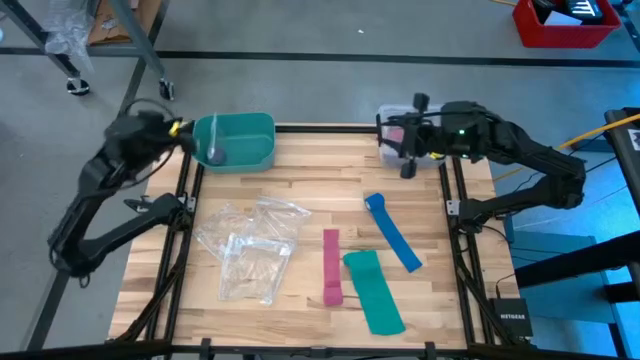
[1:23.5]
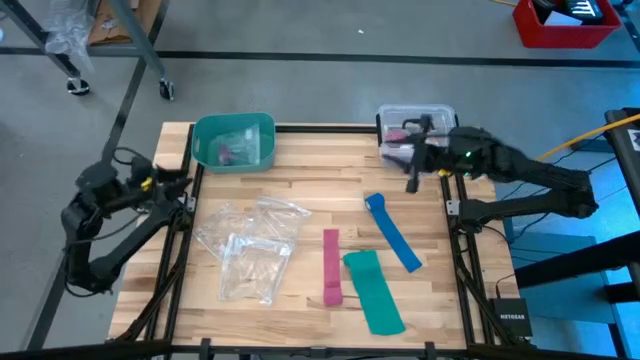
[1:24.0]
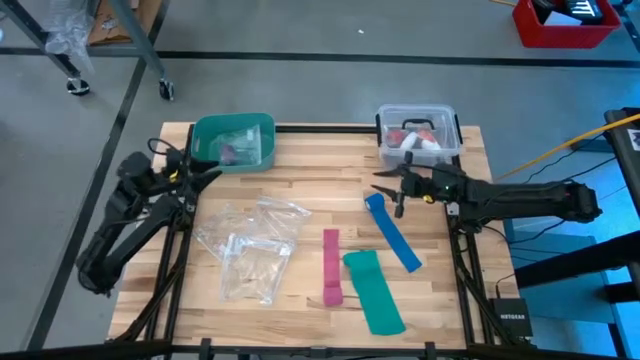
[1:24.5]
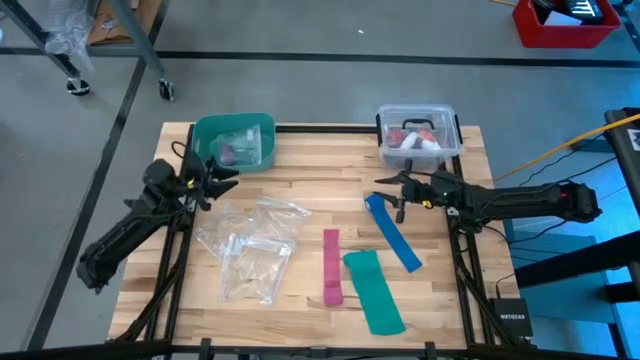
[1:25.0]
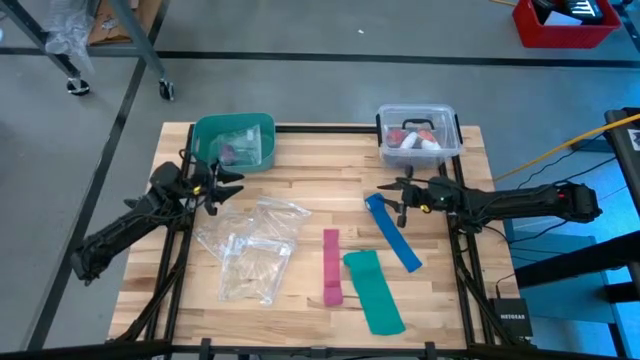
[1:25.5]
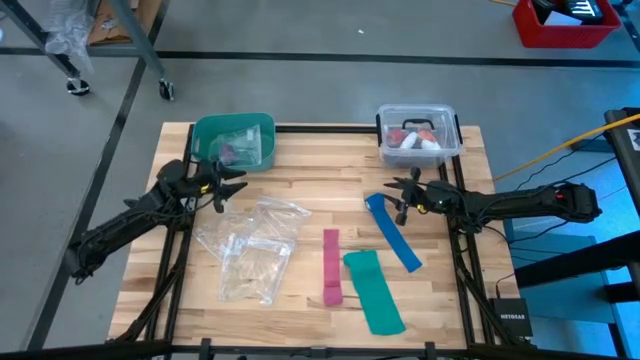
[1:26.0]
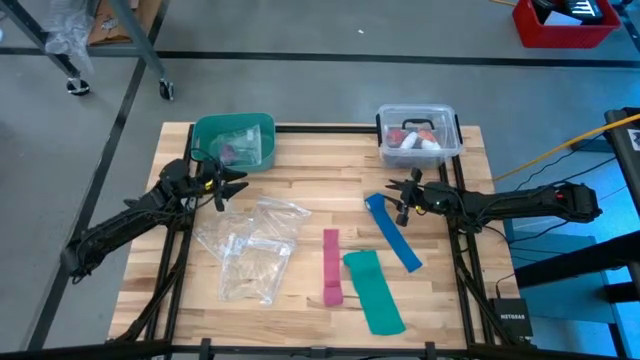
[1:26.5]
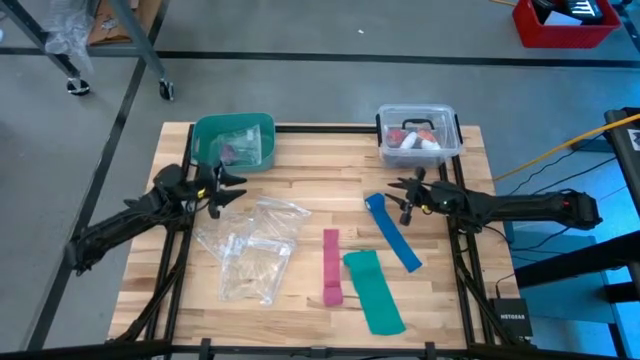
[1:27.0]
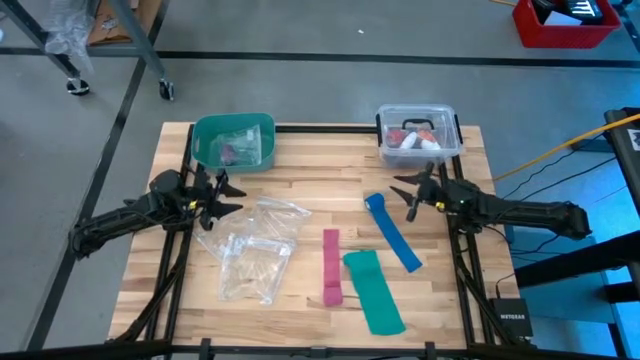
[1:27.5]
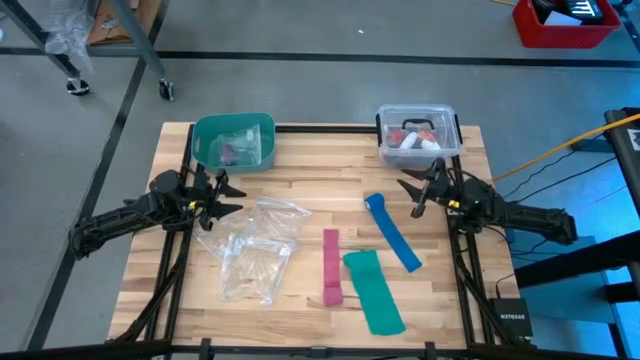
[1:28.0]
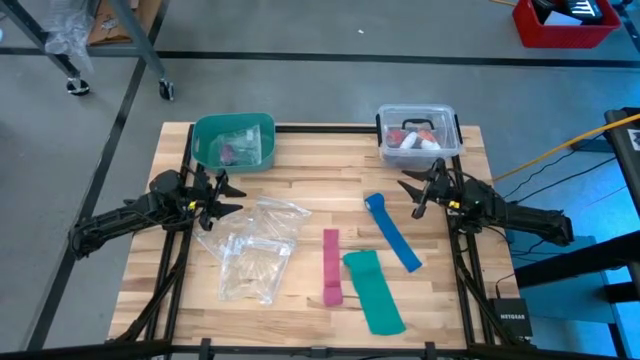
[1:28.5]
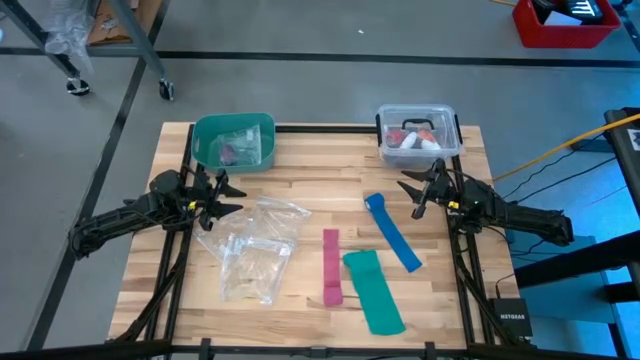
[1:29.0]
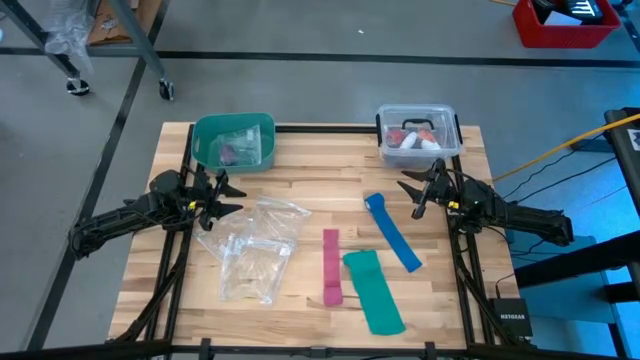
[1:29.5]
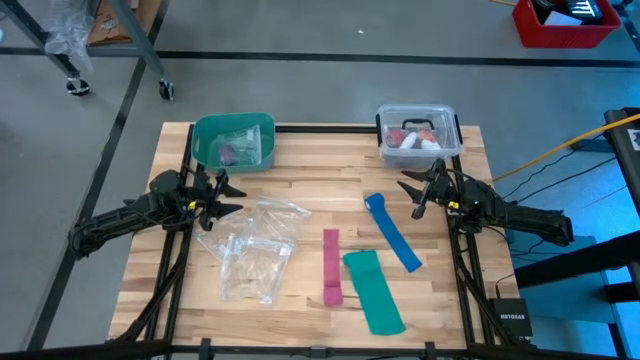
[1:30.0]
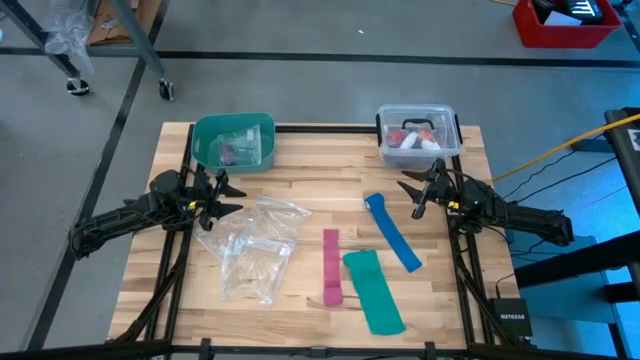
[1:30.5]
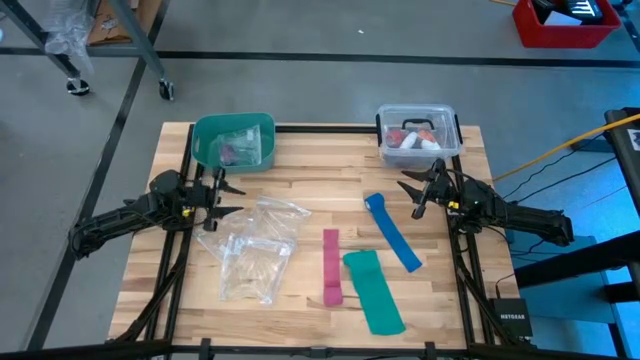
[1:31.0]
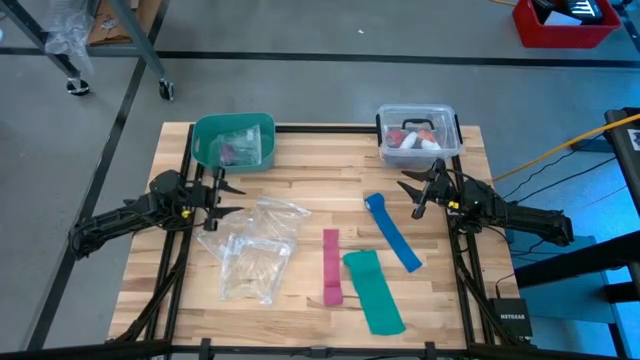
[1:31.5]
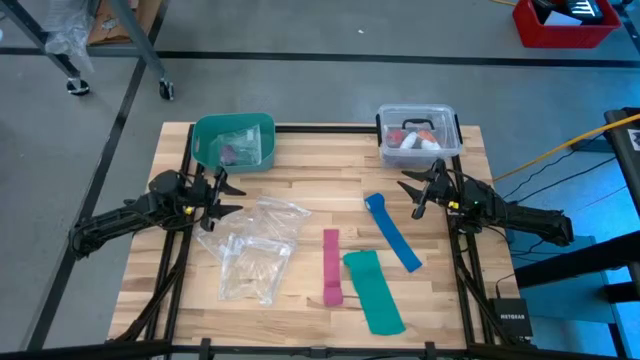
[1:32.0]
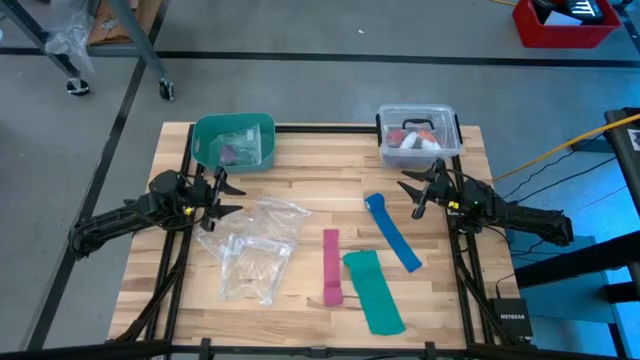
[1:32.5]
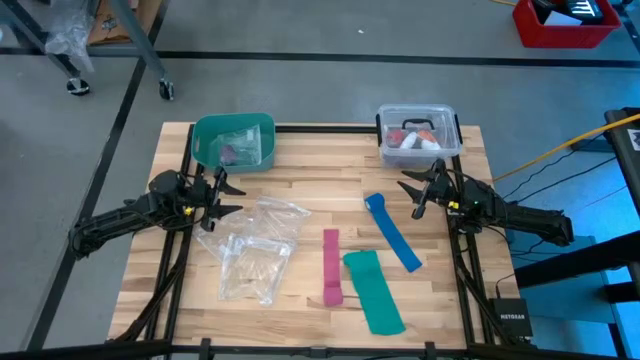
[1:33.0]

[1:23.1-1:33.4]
Task: Roll bandage
Return to Home Position

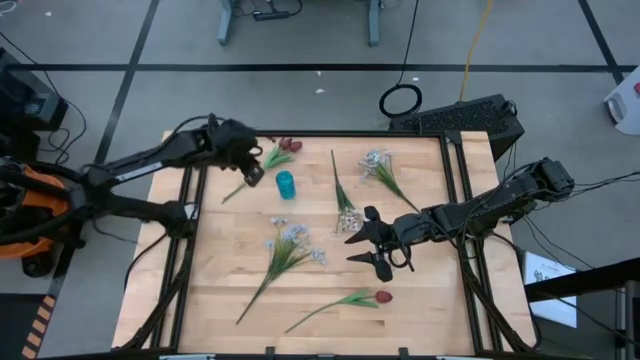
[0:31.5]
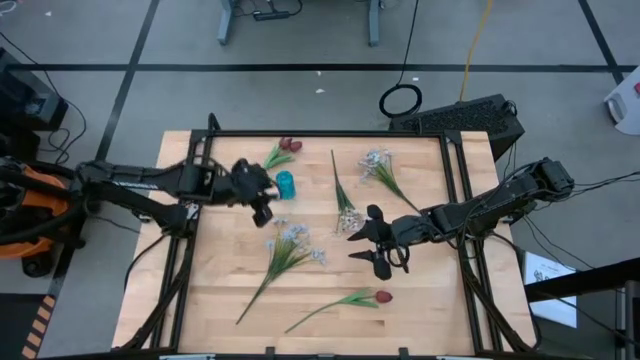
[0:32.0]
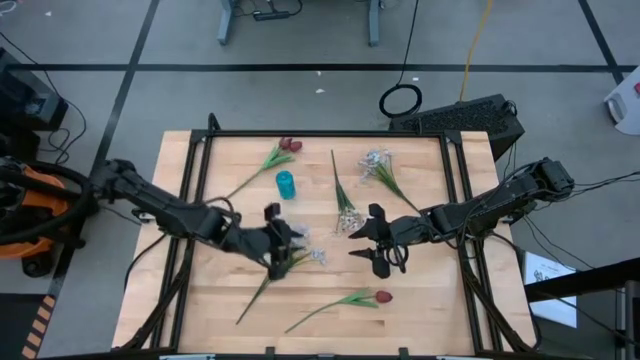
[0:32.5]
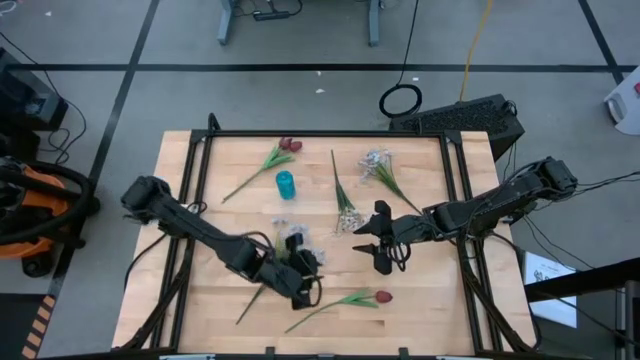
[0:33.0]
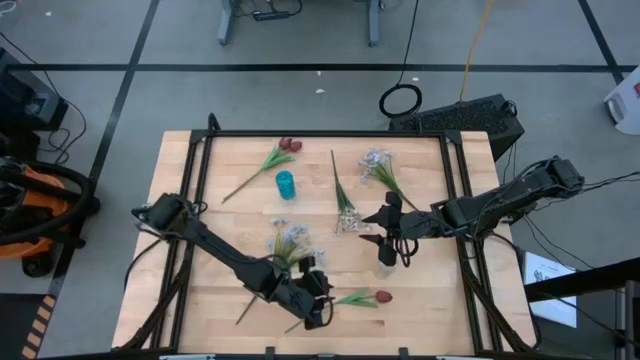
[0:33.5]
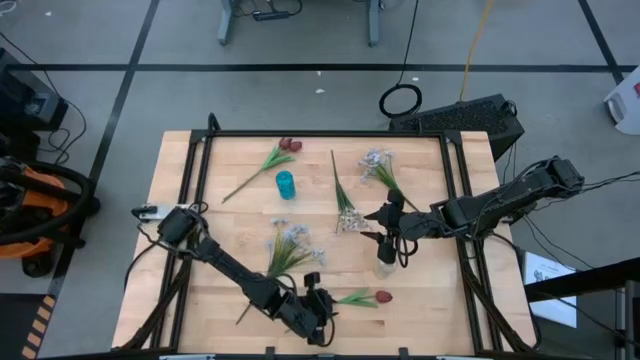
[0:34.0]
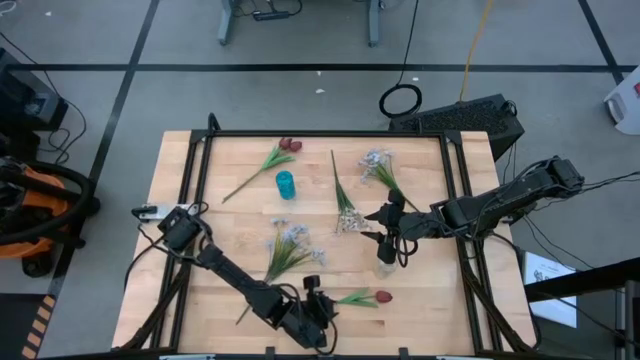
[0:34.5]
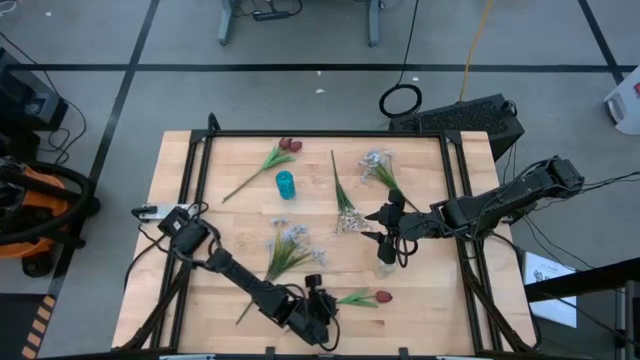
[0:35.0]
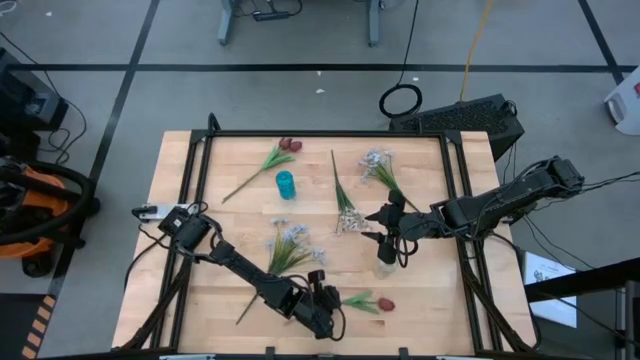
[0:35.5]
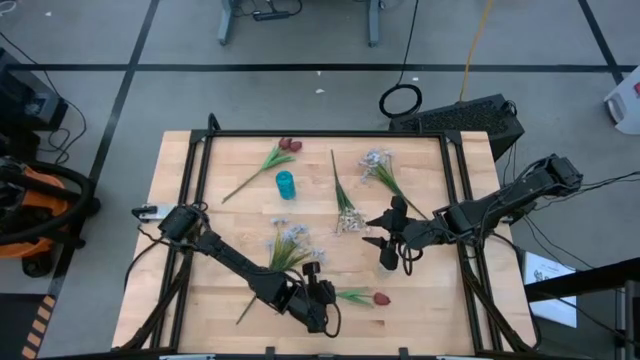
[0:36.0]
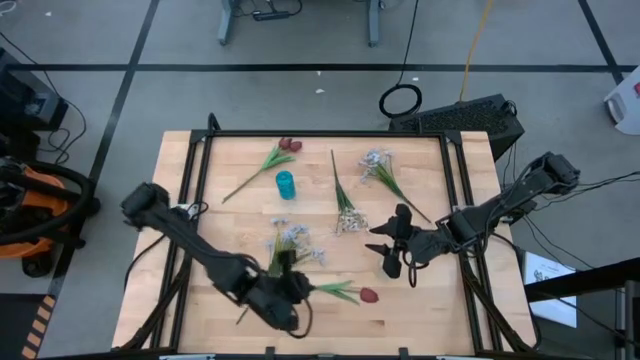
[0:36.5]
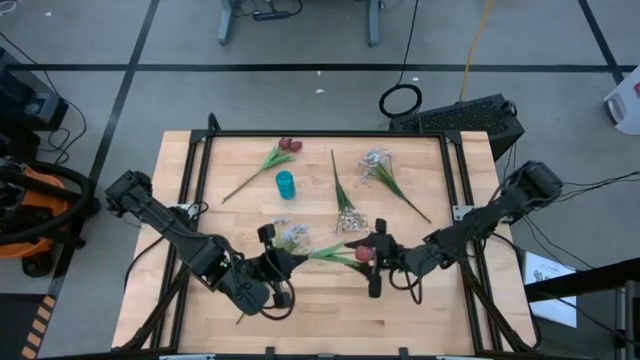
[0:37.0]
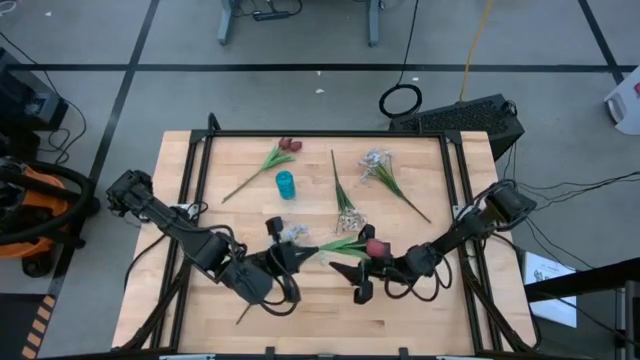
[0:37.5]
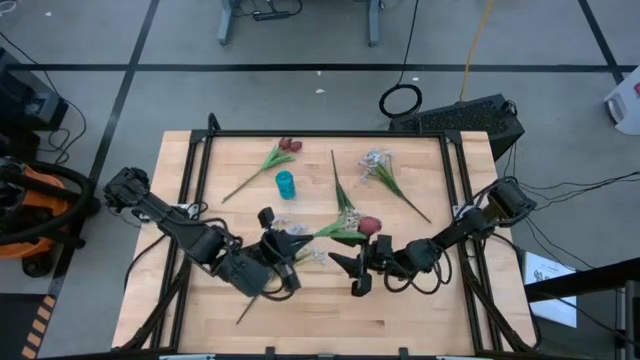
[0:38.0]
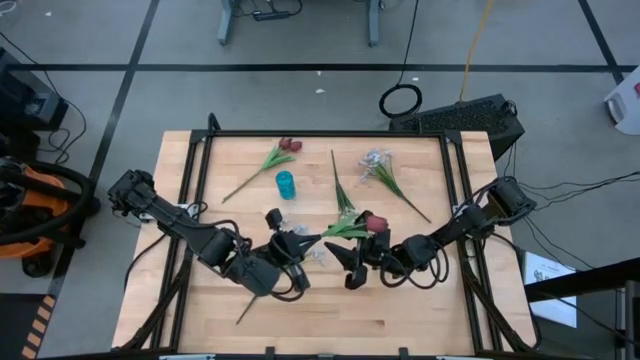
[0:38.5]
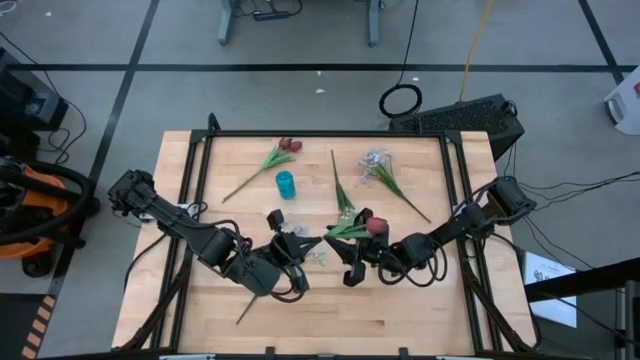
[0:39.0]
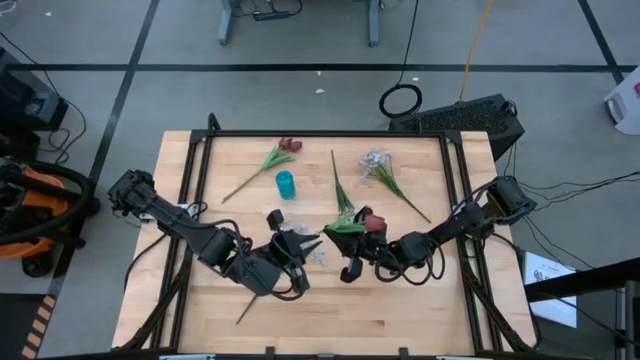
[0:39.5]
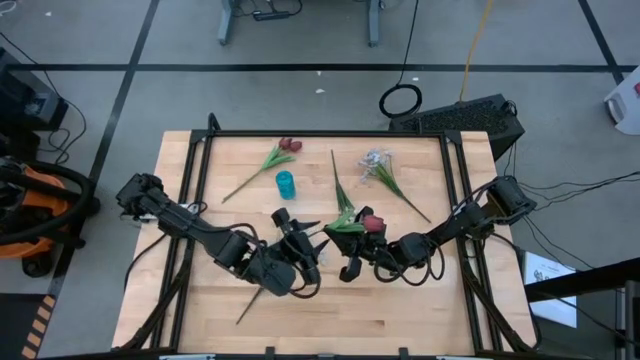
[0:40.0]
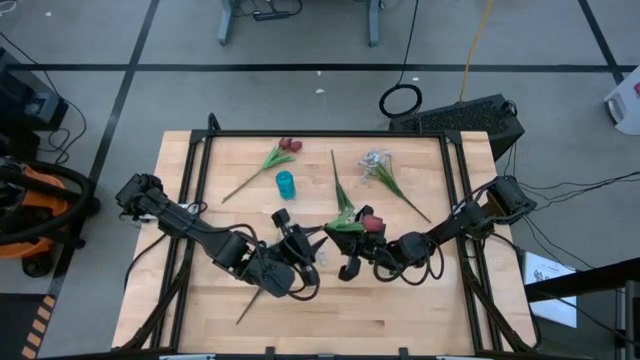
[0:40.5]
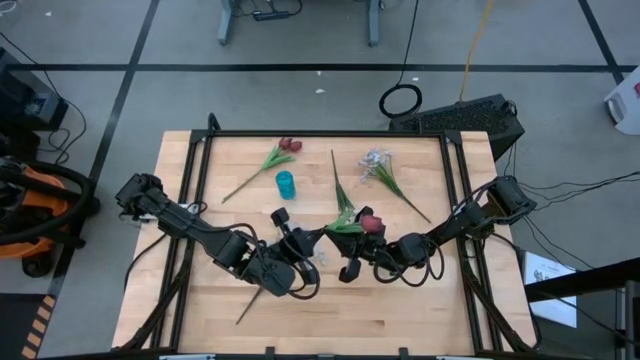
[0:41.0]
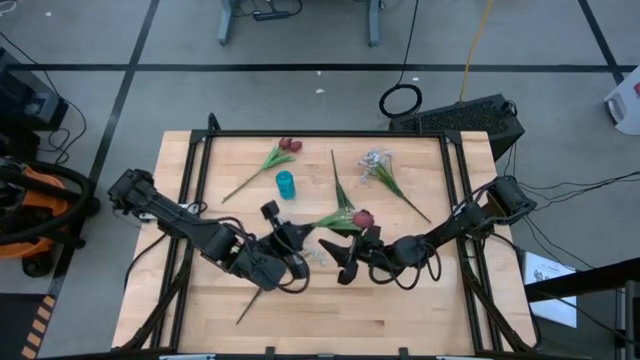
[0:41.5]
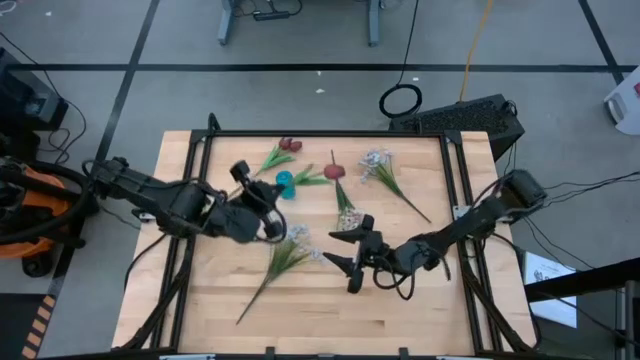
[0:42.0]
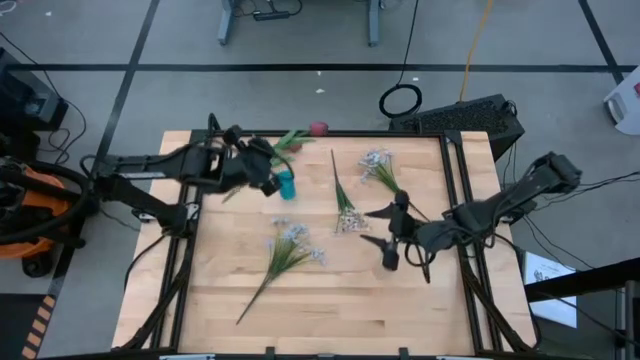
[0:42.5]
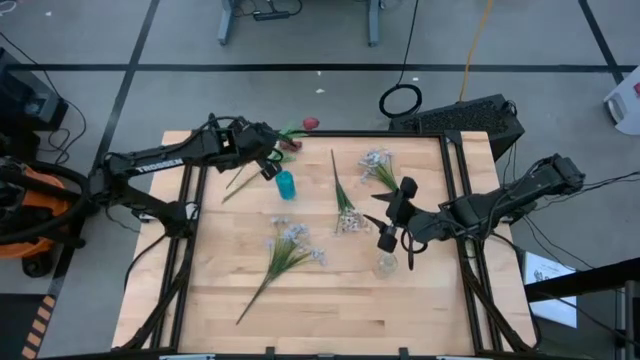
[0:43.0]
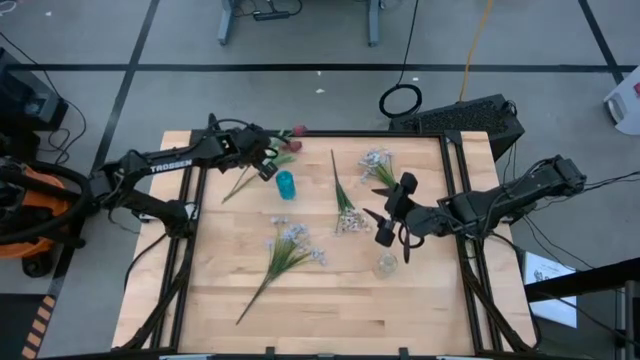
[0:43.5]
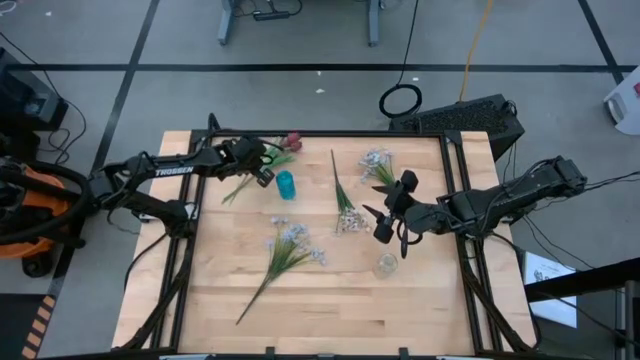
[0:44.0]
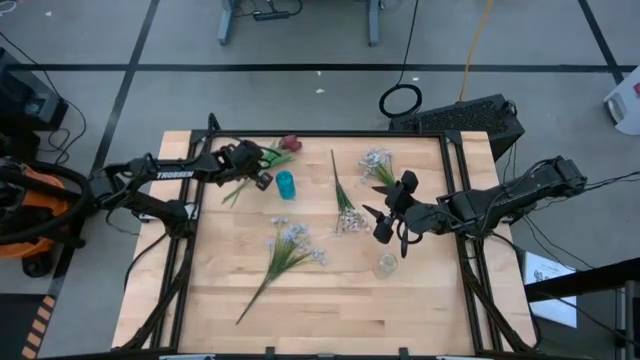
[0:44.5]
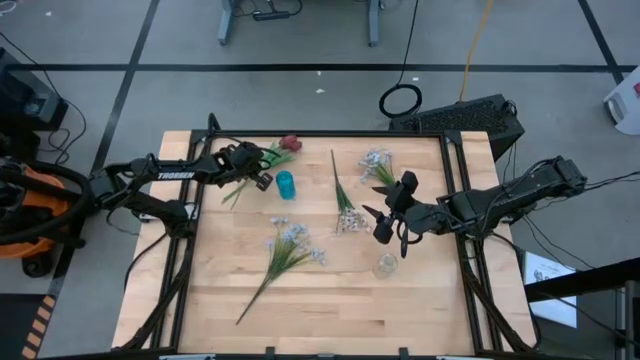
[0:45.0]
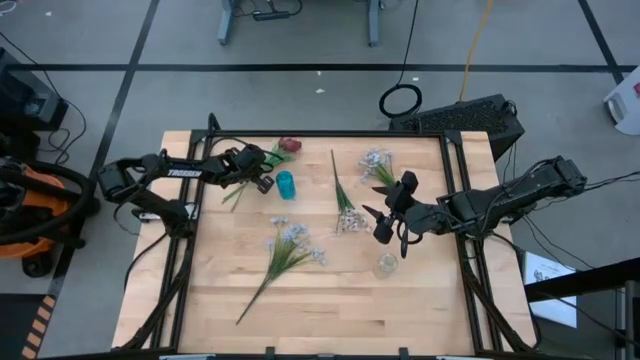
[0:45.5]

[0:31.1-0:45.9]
Task: Sort flowers into vase by color
Move the bottom red tulip to the top right of the table
